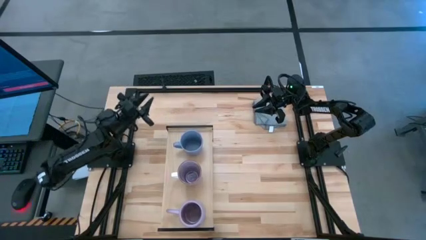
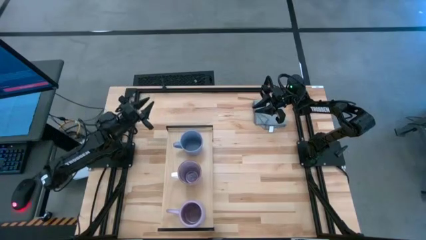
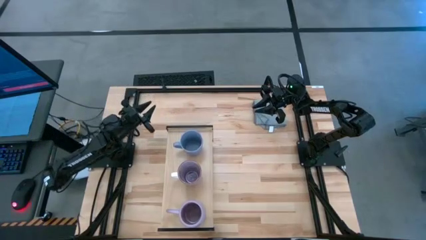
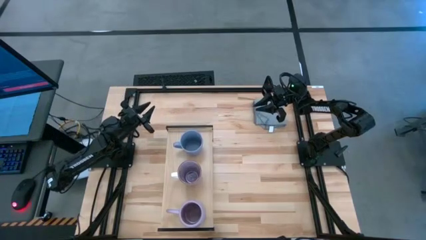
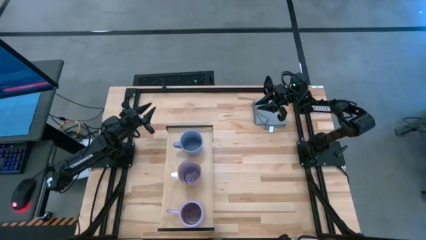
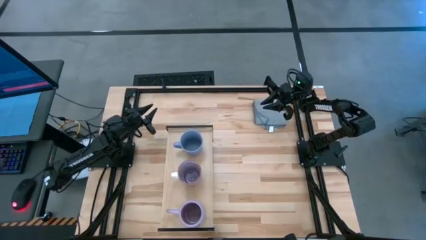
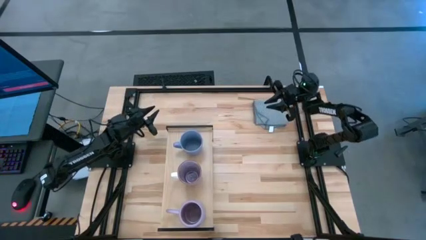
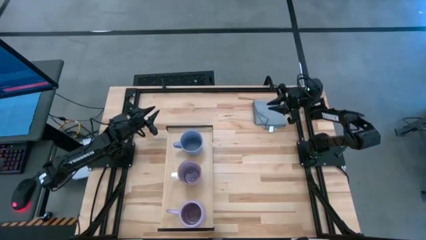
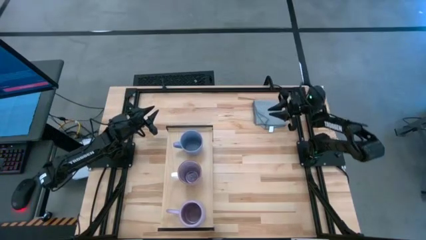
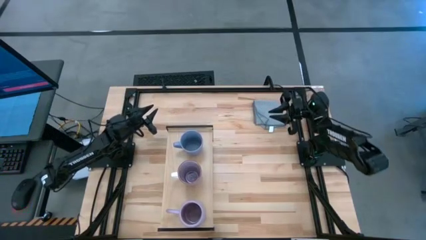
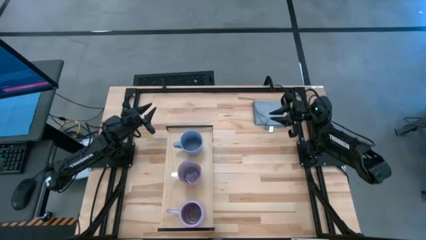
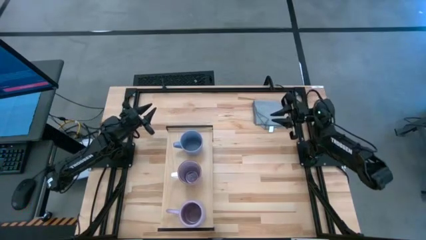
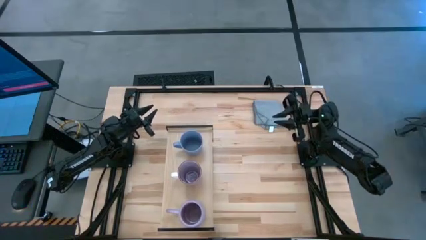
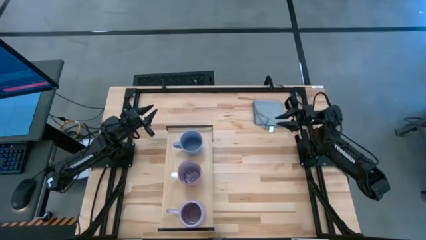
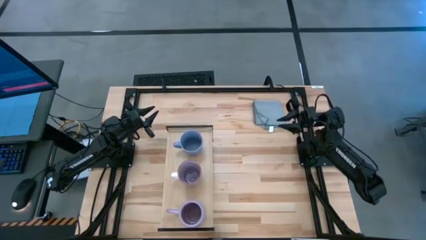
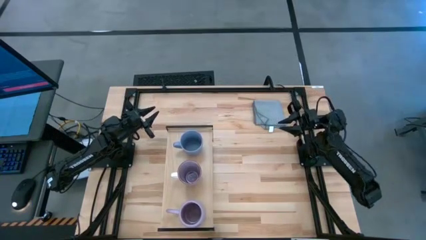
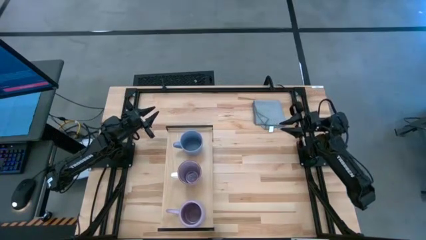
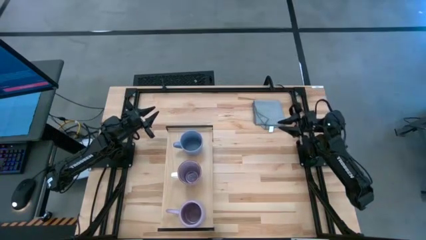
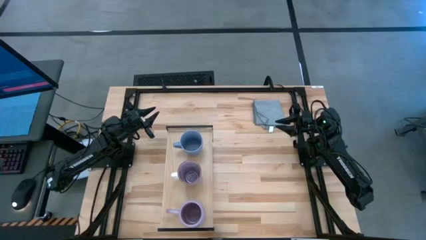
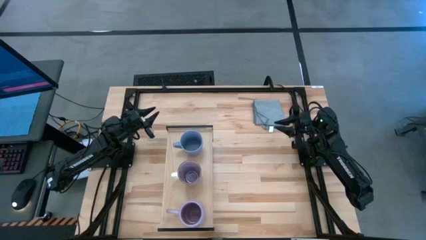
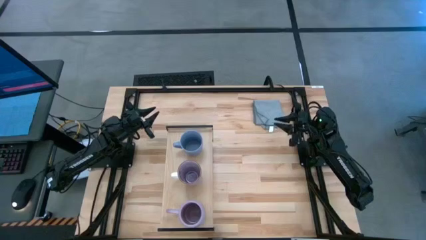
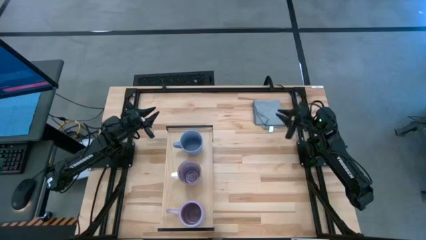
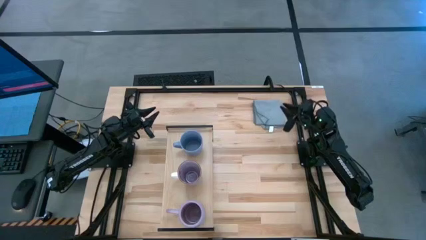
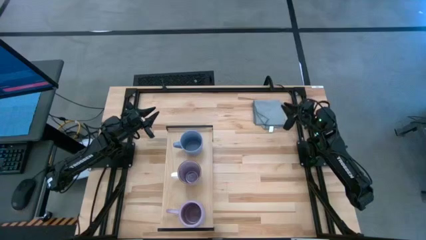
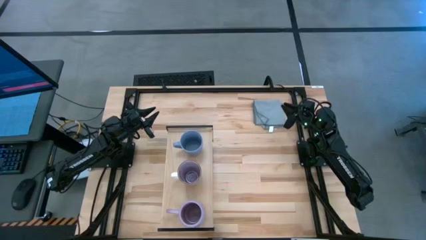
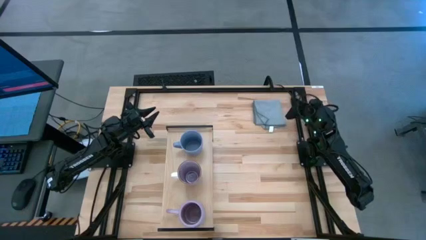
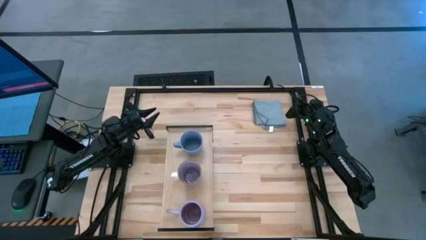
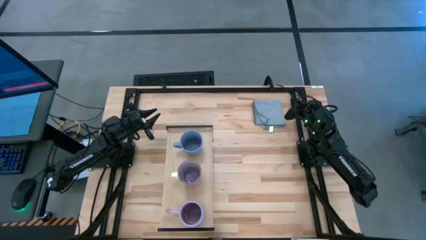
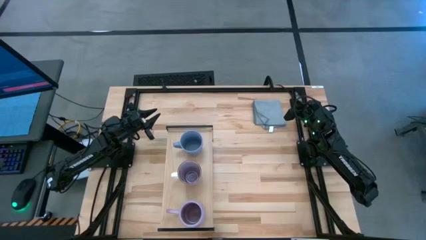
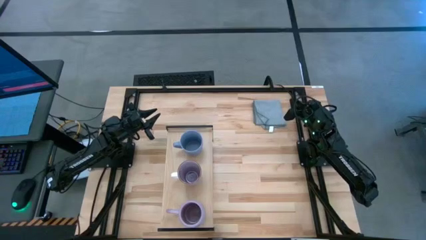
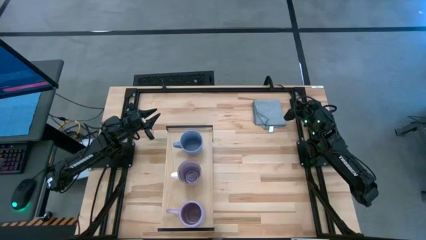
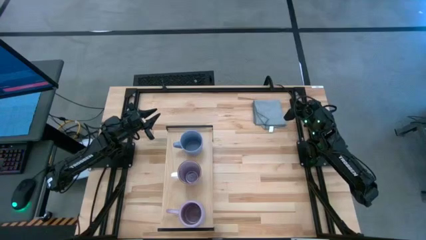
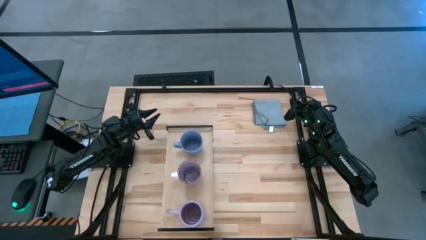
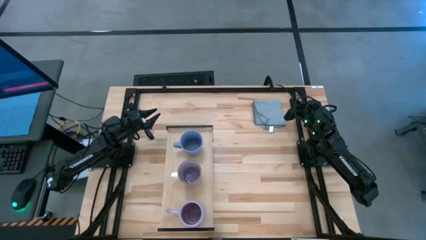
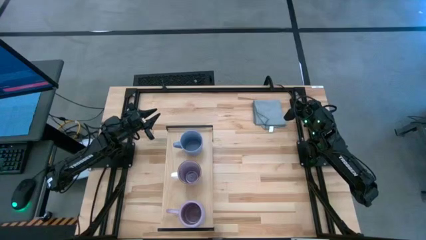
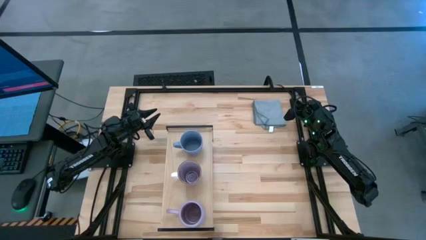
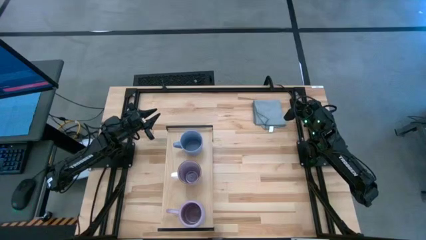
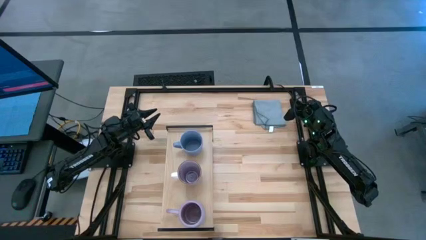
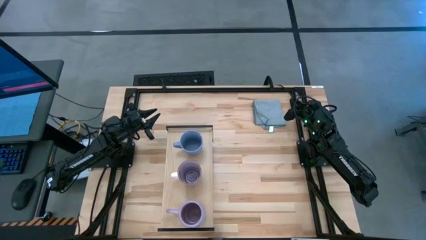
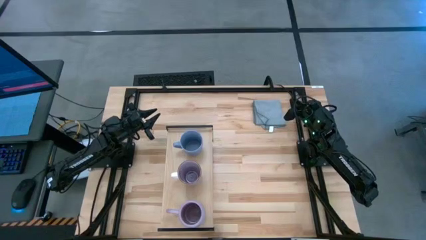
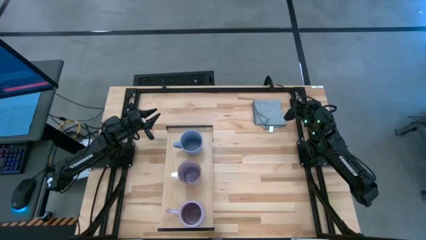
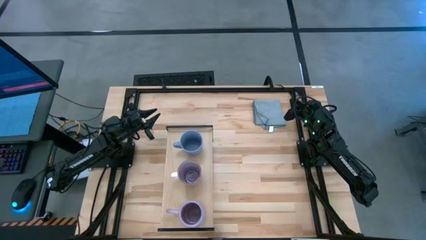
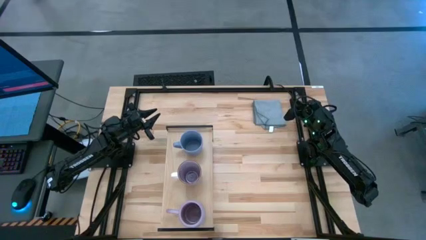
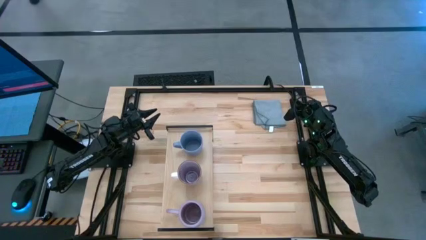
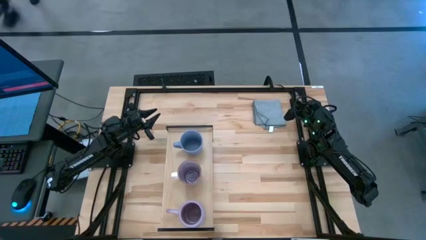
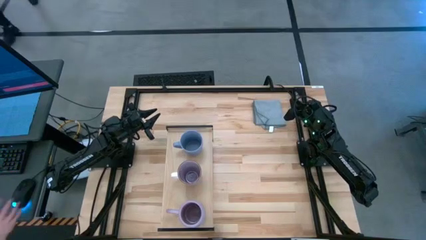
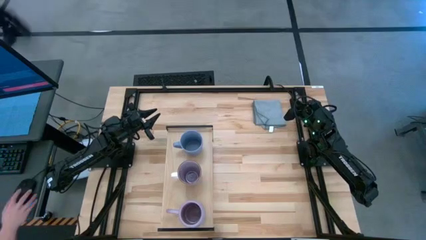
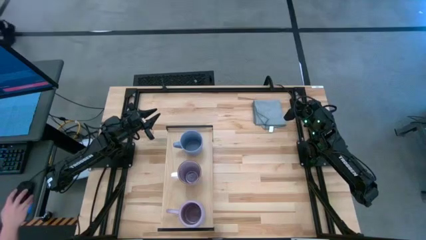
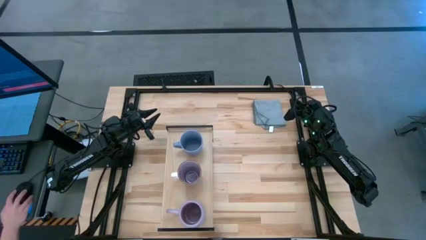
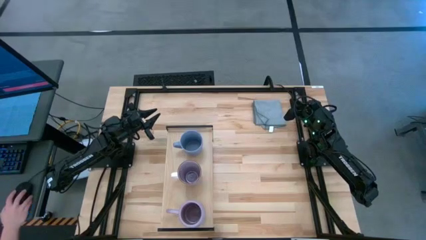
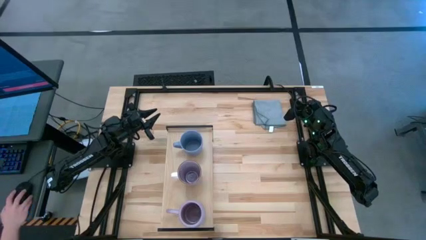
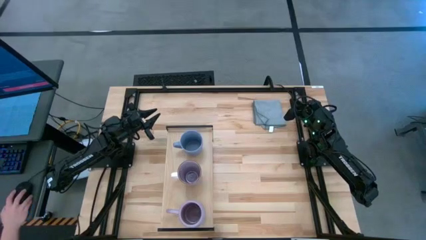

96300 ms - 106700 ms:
Task: Stack small to large cups/mugs on shelf
Return to Home Position
